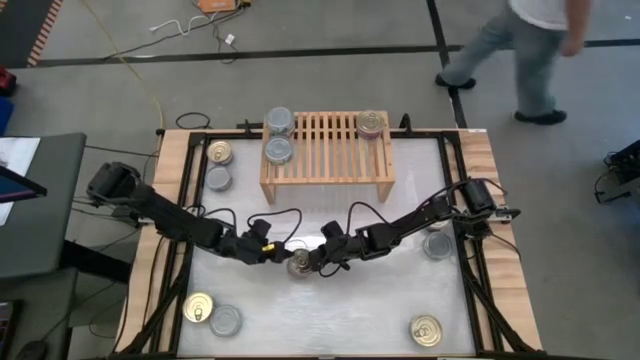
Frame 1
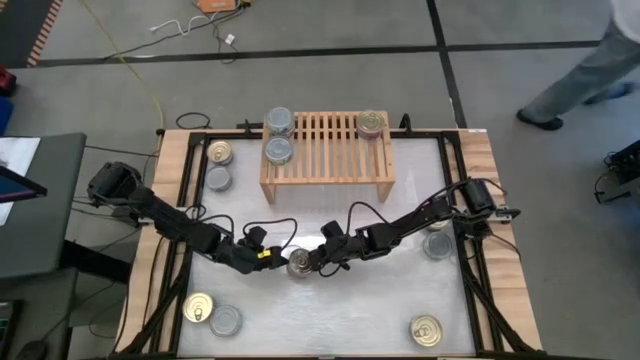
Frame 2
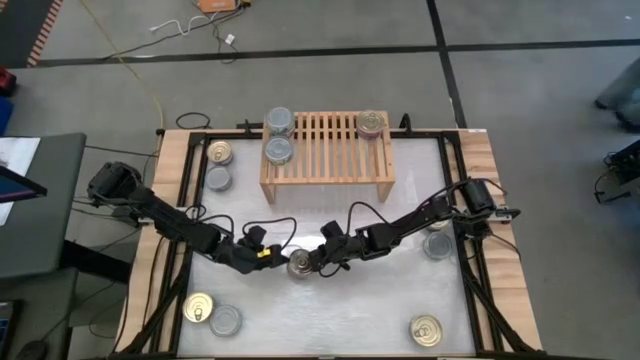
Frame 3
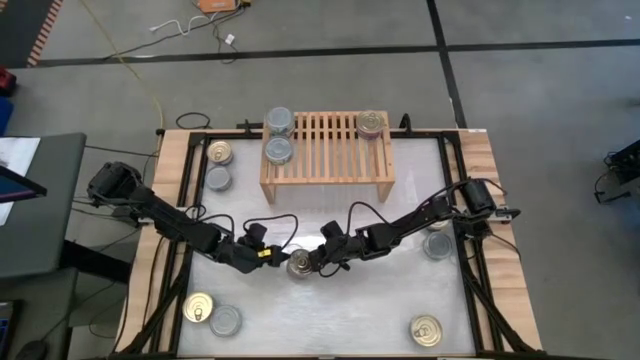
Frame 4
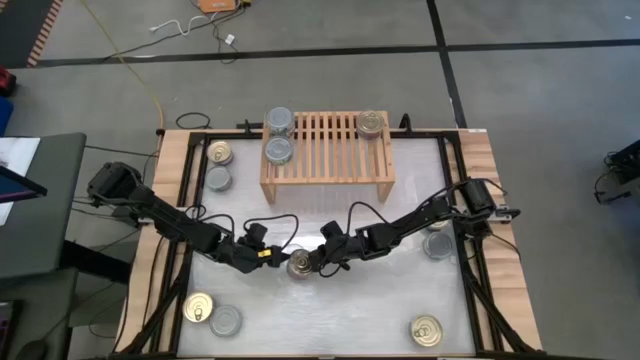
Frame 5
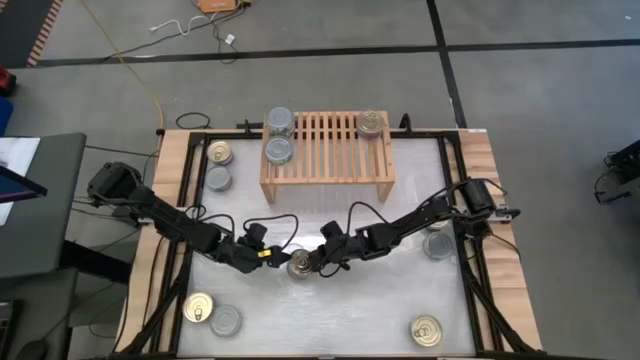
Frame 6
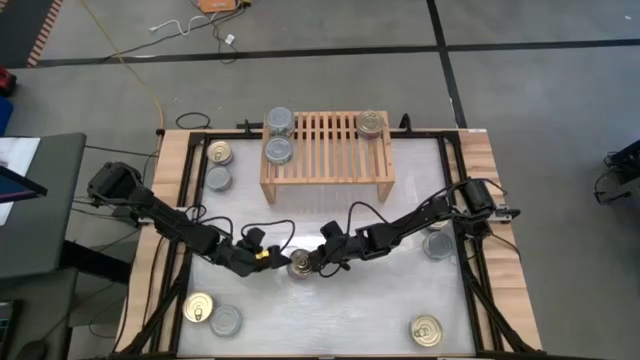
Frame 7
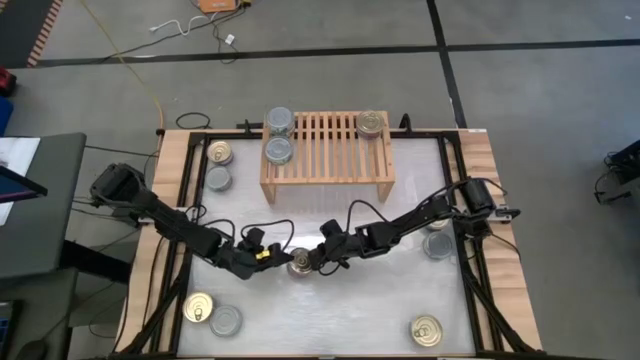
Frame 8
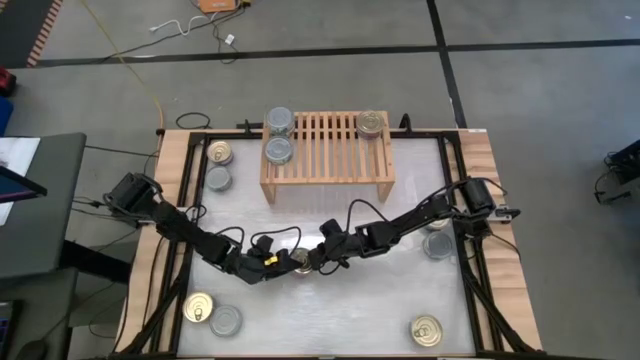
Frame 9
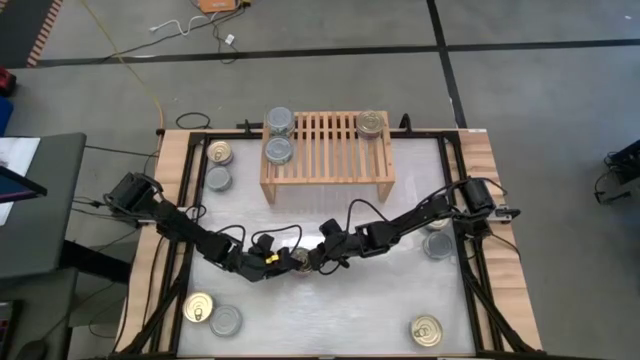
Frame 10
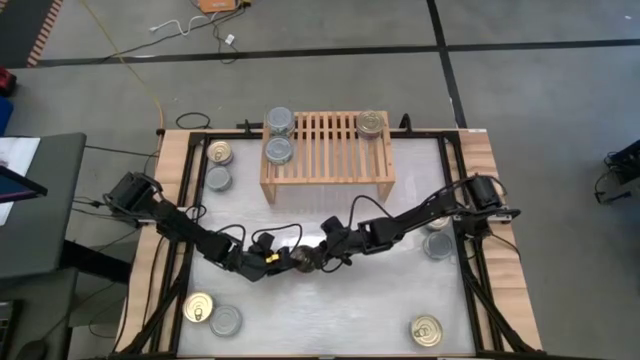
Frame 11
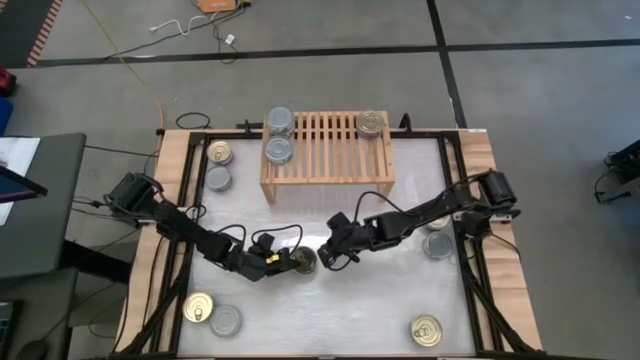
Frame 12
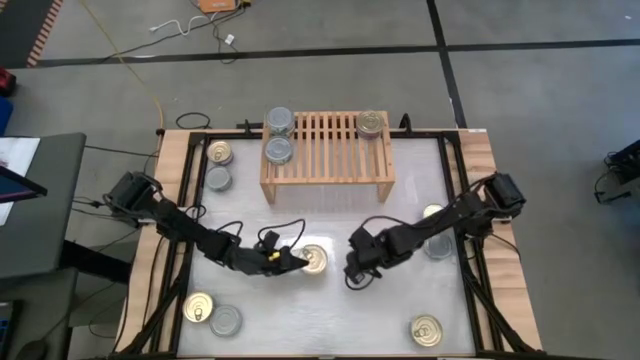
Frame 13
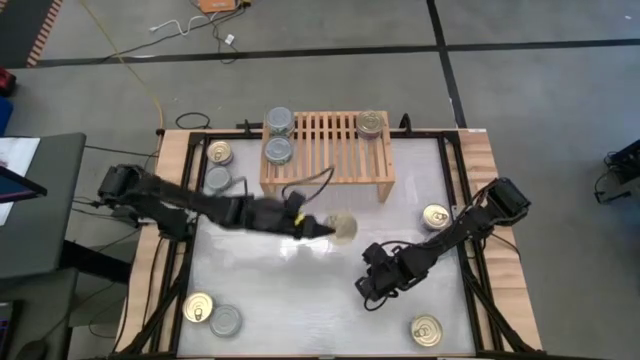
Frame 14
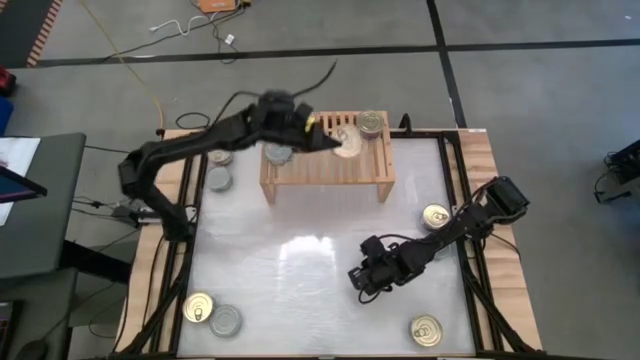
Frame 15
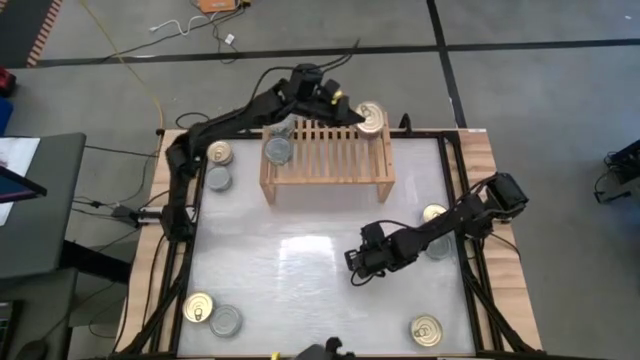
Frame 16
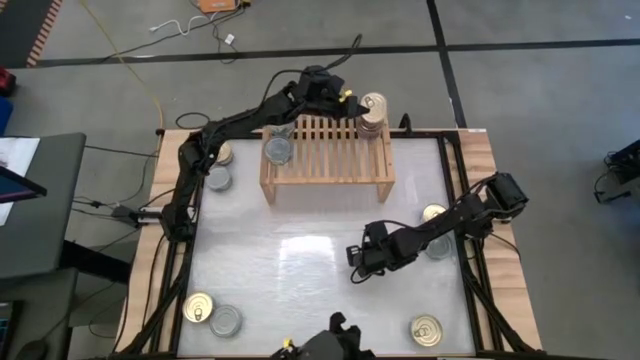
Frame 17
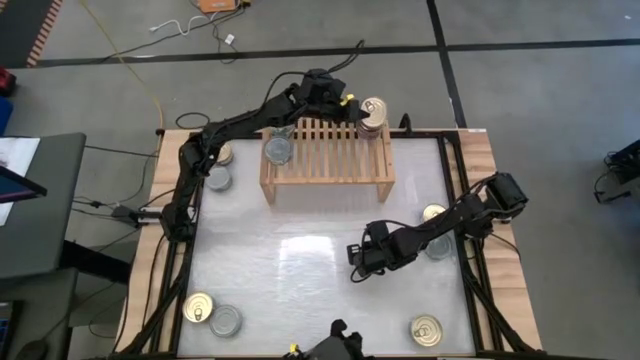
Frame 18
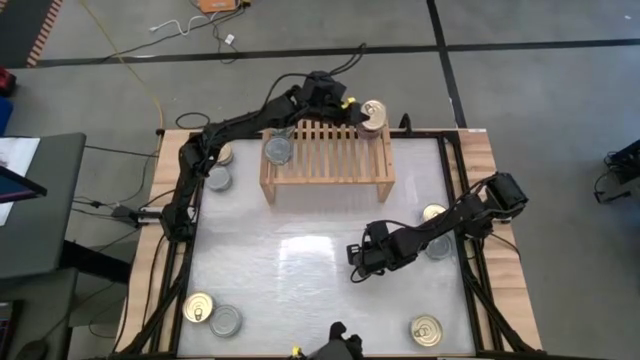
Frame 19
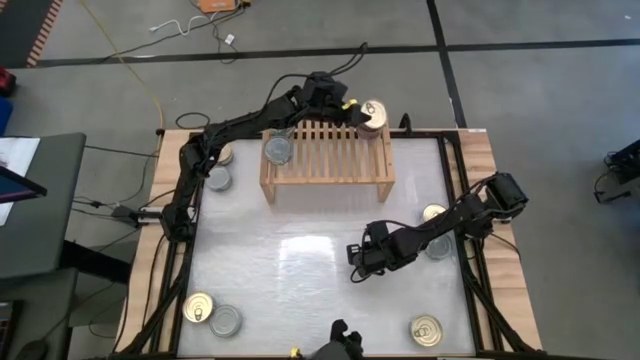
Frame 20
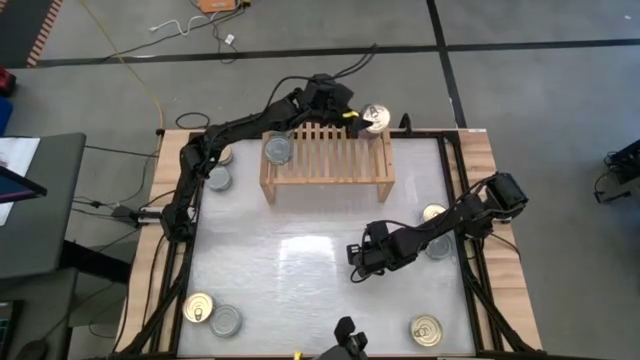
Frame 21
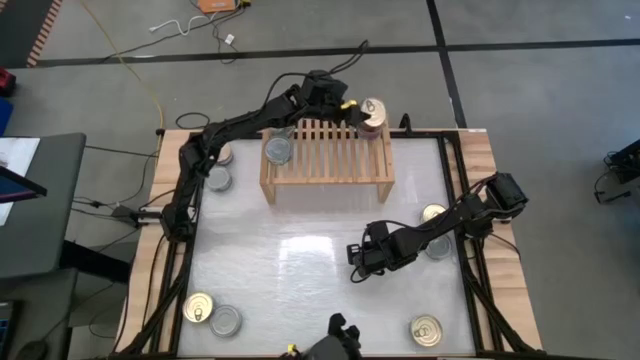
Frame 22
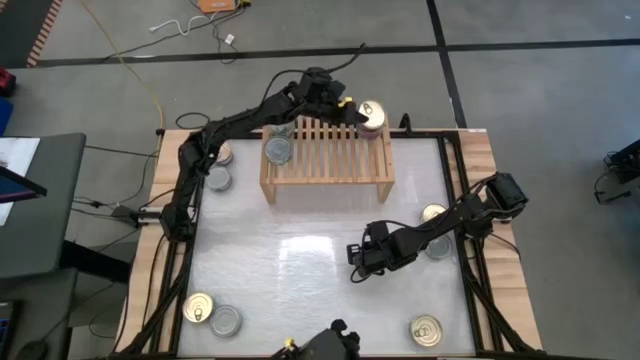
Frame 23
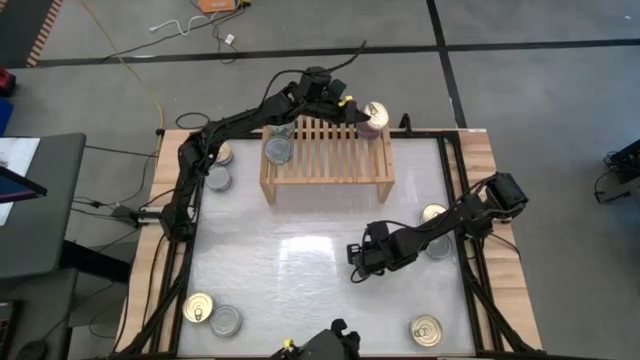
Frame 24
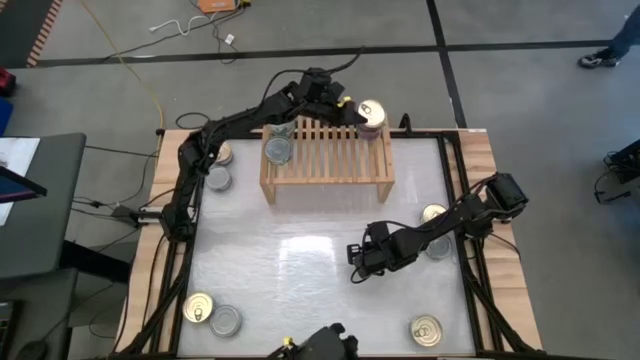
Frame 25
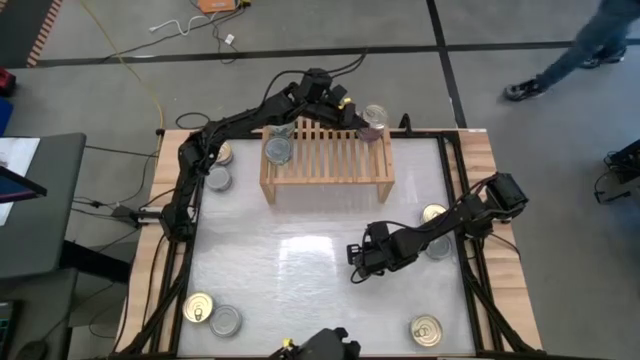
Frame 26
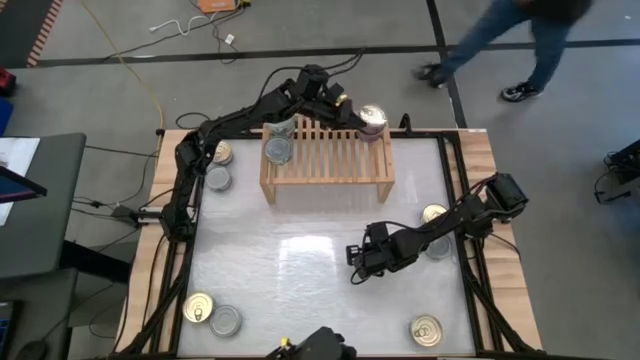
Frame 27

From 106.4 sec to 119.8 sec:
Task: Stack canned seafood by type on shelf
Stack the blue tuna can on top of the blue tuna can on the shelf

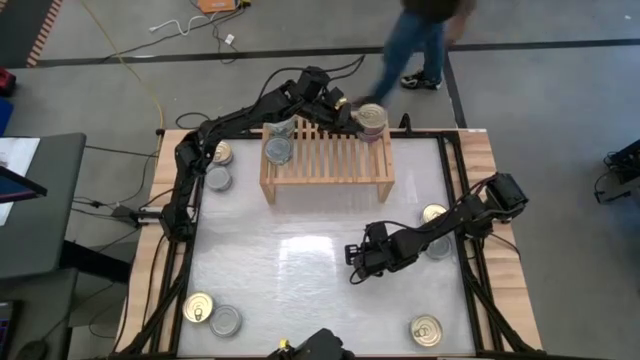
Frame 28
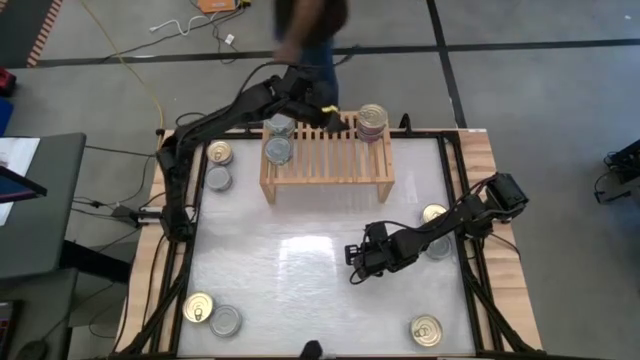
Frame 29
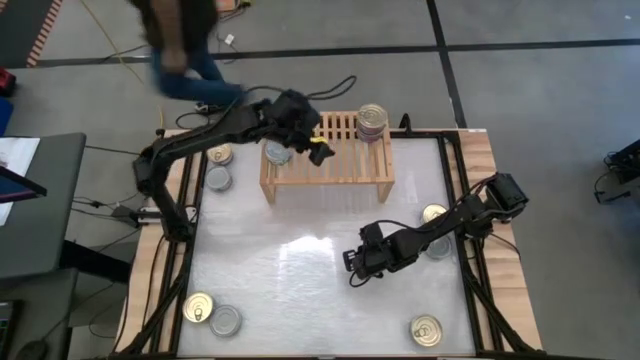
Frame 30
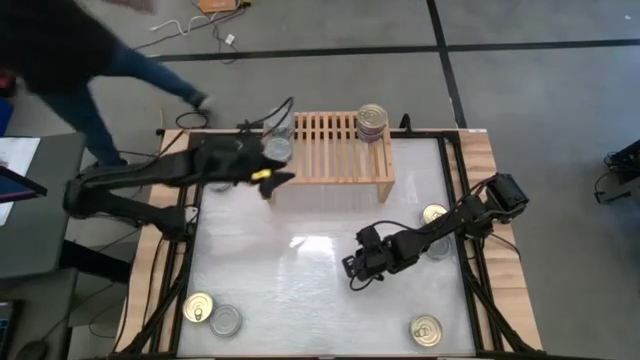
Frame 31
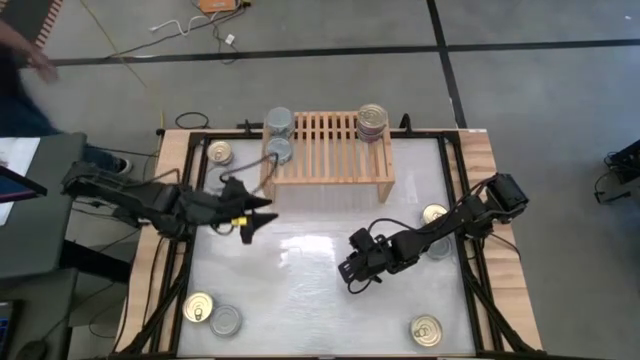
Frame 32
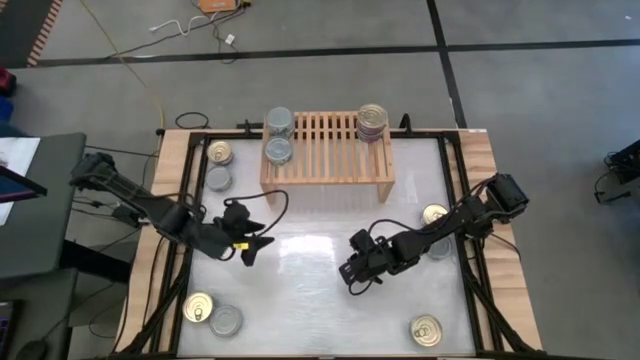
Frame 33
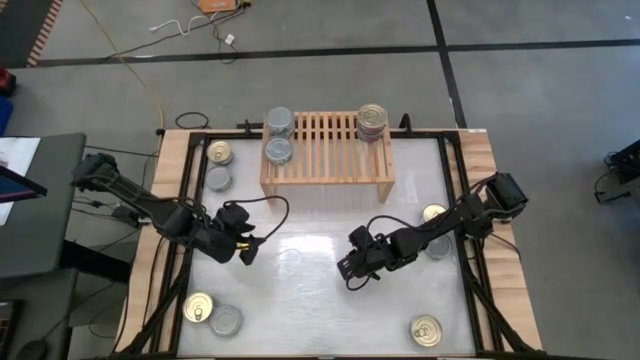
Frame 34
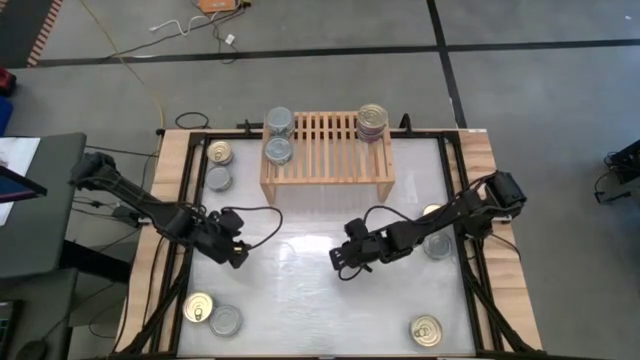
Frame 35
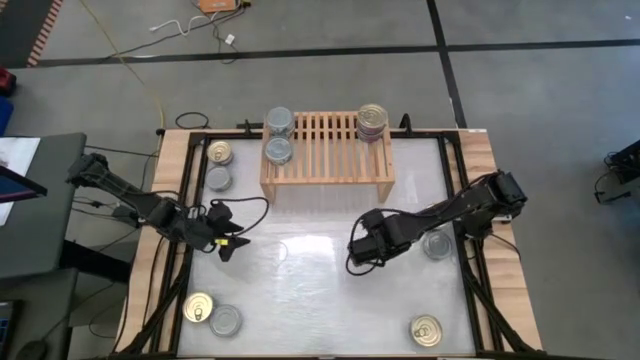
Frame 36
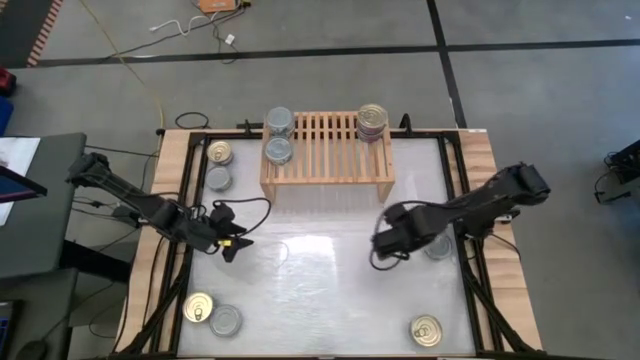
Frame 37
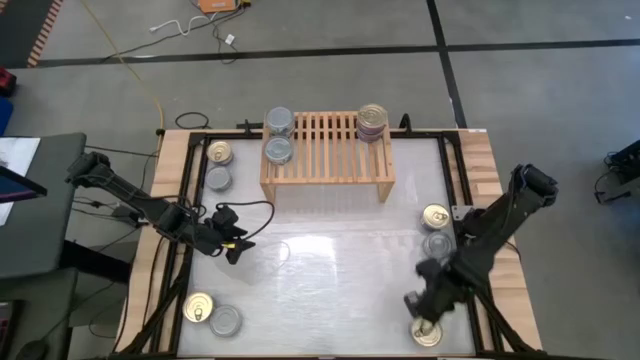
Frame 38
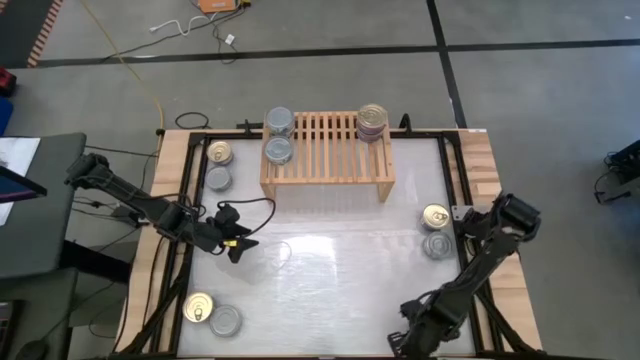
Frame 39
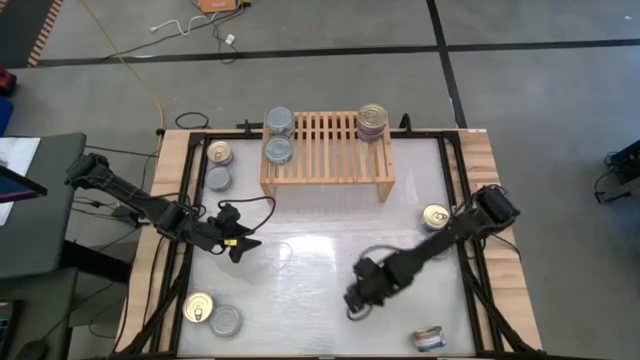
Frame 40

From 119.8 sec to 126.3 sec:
Move the blue tuna can to the center of the table

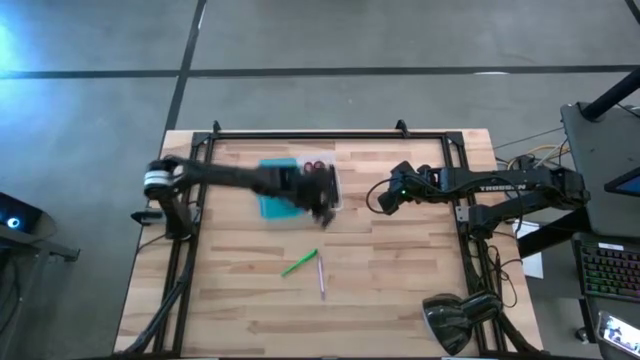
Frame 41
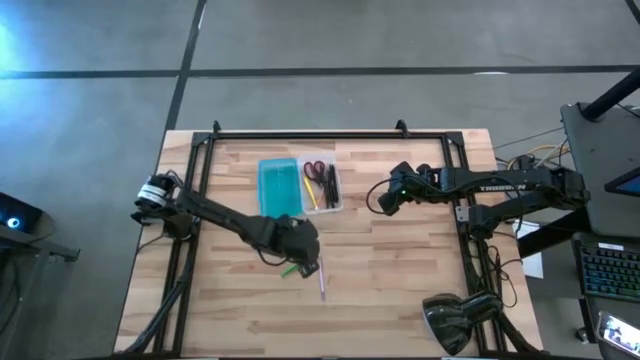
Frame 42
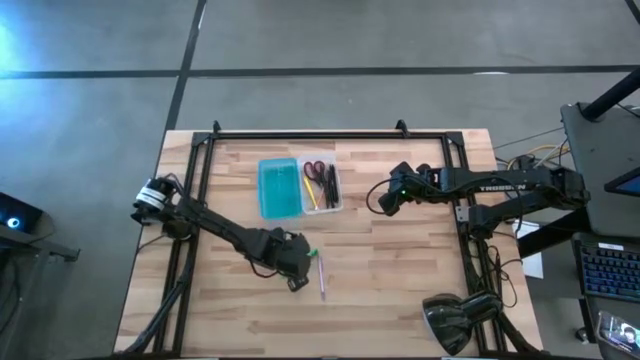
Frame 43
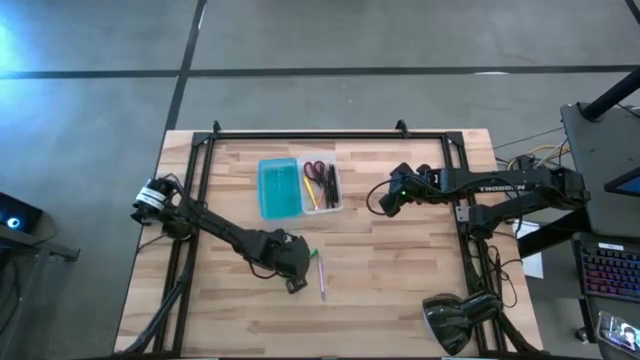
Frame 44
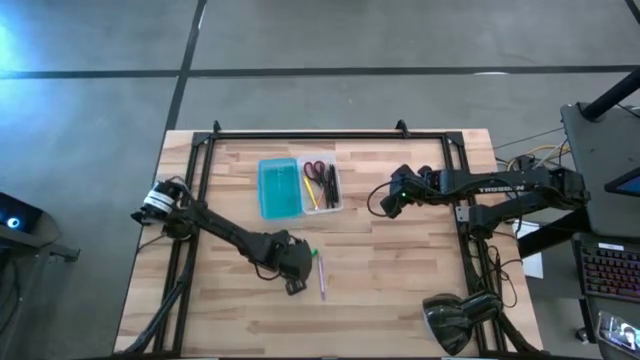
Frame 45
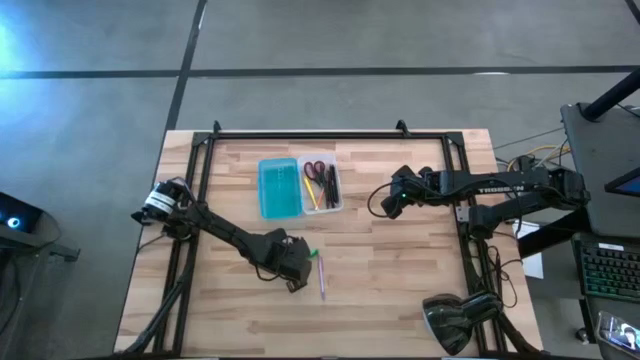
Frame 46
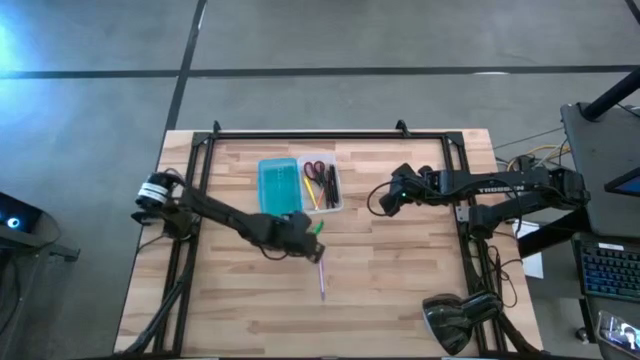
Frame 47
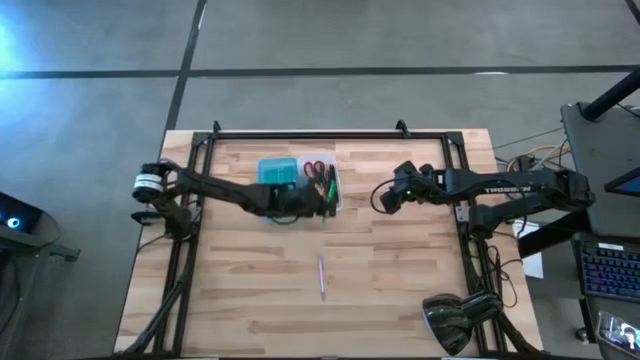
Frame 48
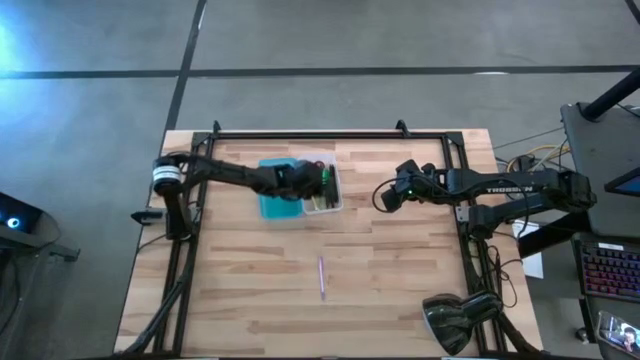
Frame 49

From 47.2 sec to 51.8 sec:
Task: Pick & place school supplies into a supply box
Put the green pen into the pencil box
